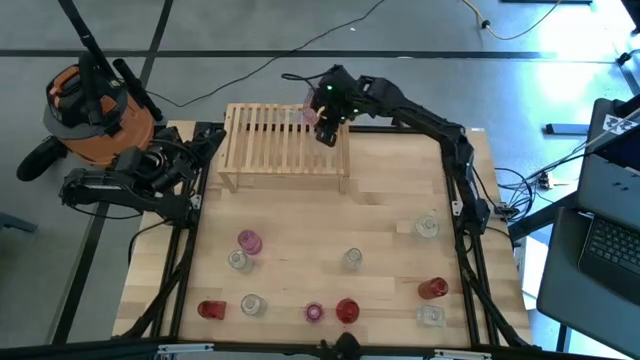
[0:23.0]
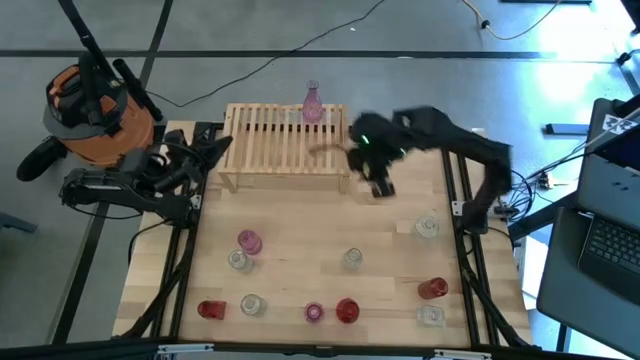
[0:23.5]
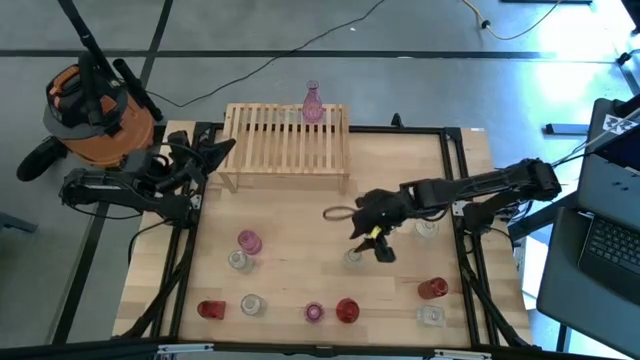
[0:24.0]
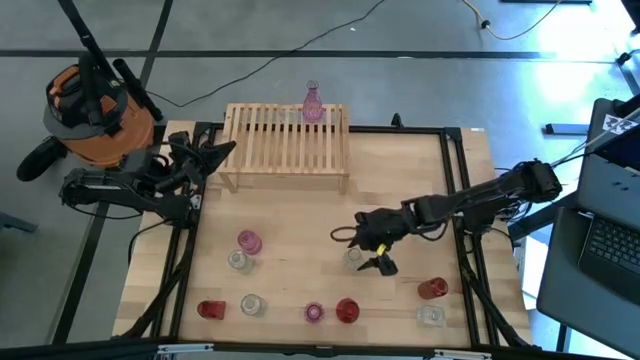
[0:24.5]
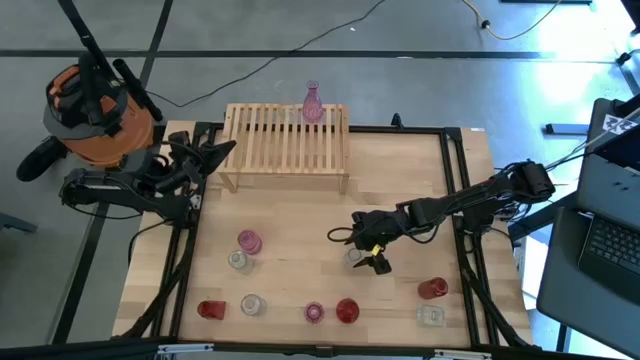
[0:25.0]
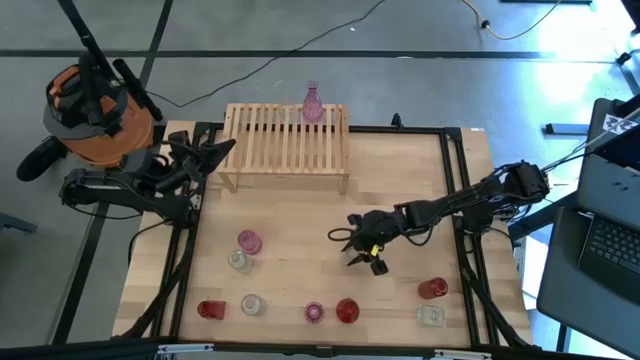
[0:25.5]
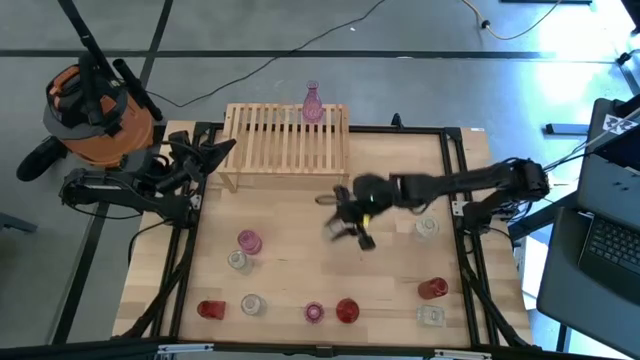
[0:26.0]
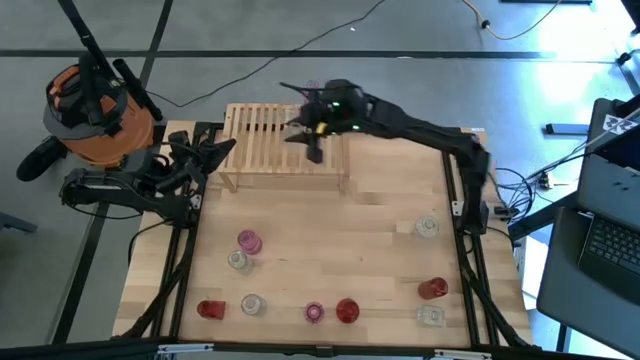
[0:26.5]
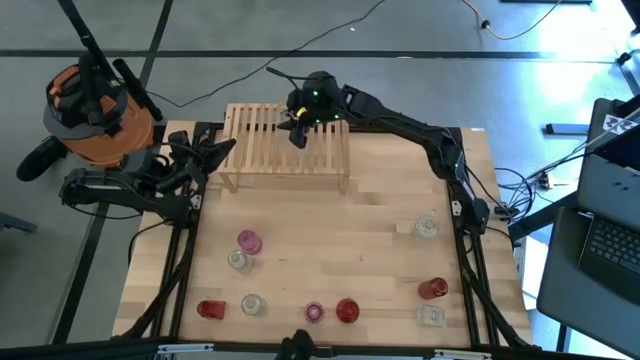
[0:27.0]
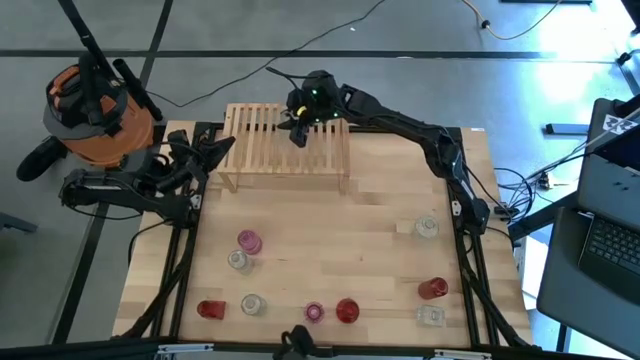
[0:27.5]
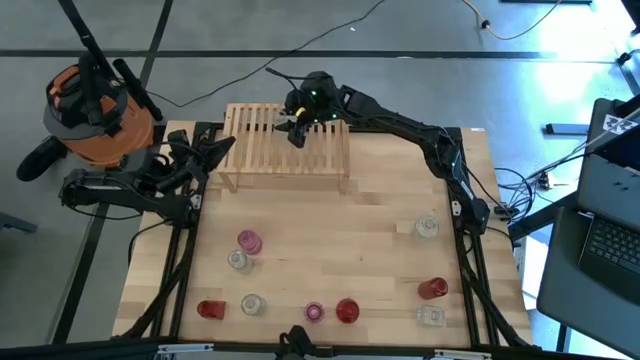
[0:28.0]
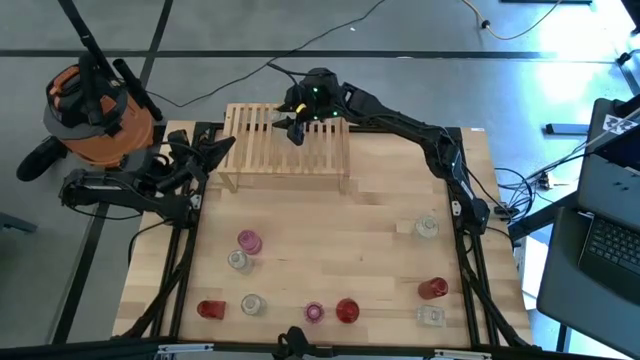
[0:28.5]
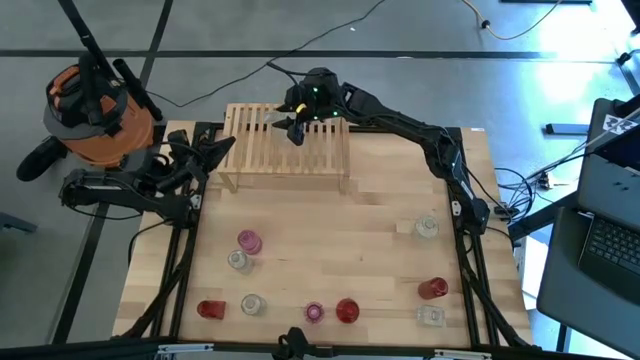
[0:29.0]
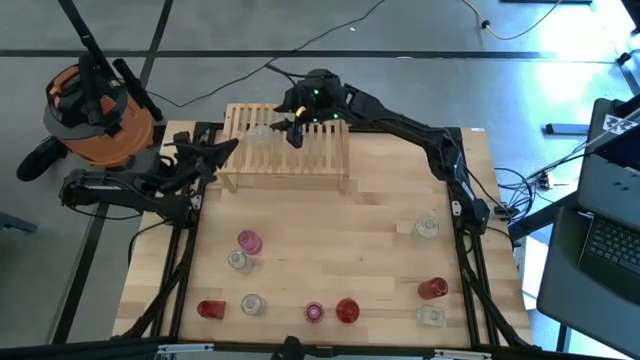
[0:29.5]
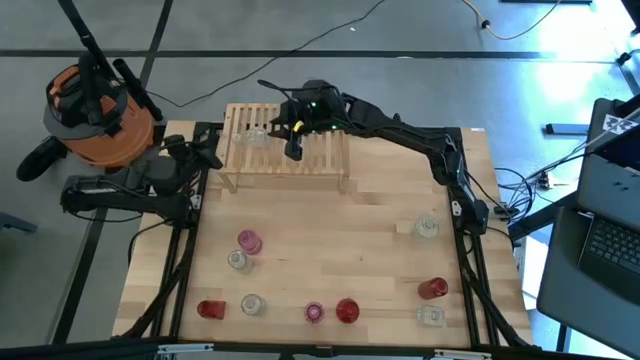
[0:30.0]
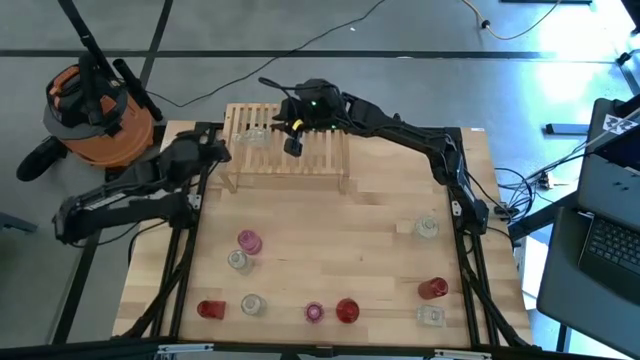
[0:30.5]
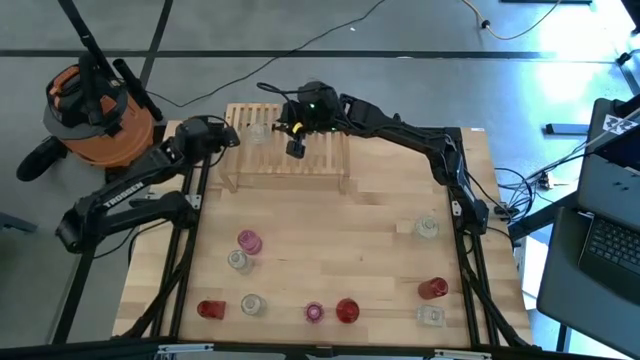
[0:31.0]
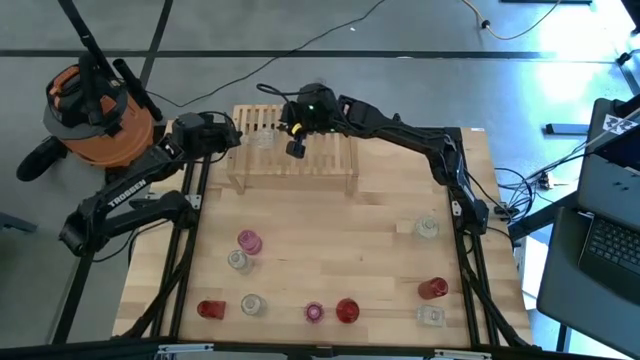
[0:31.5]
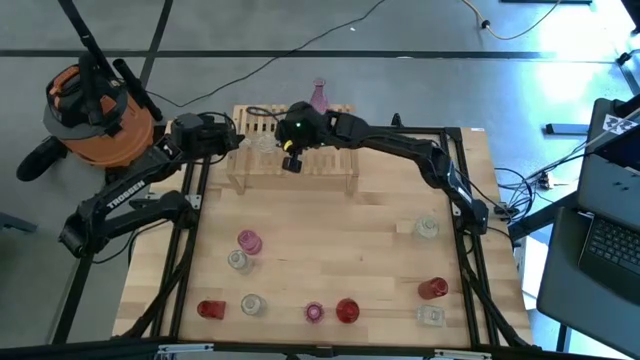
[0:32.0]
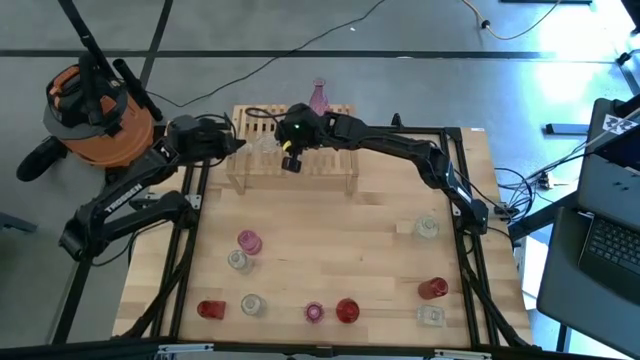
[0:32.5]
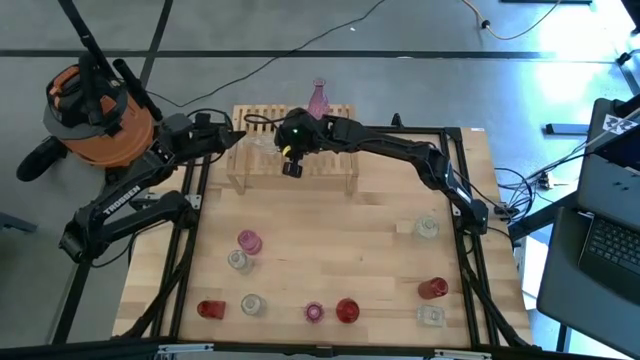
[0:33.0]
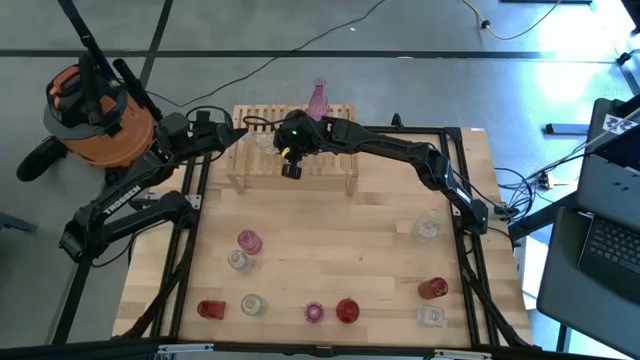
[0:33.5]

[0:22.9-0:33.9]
Task: sort vases onto shelf
Put the transparent vase on the shelf aligned with the other transparent vase on the right

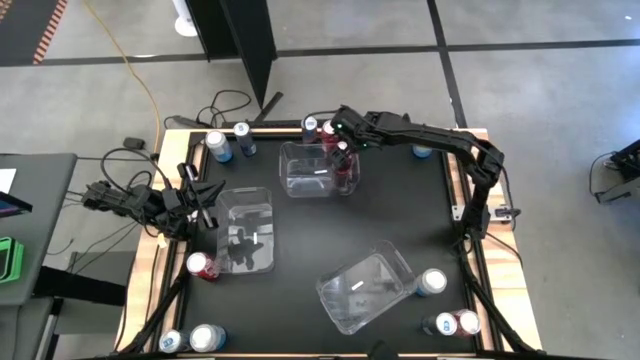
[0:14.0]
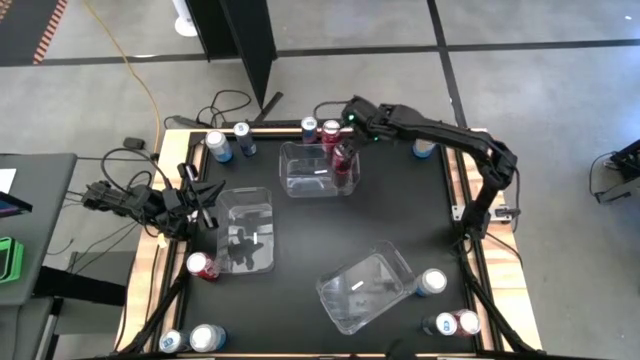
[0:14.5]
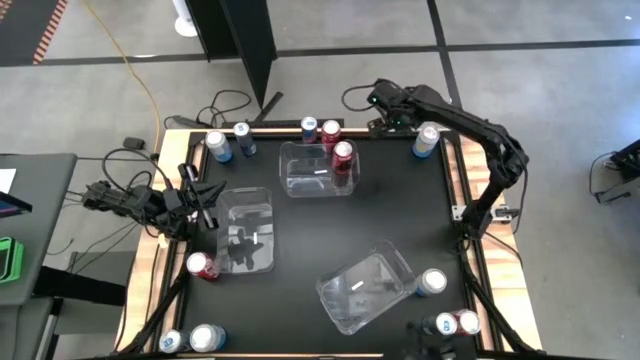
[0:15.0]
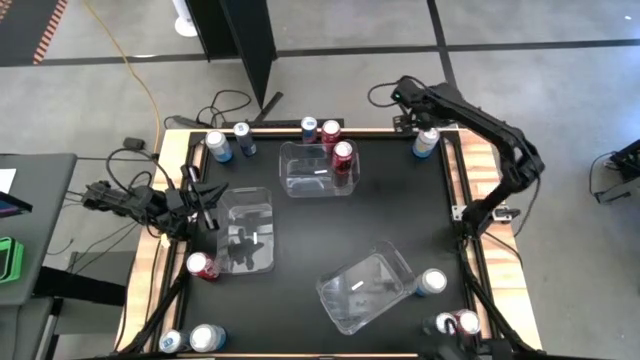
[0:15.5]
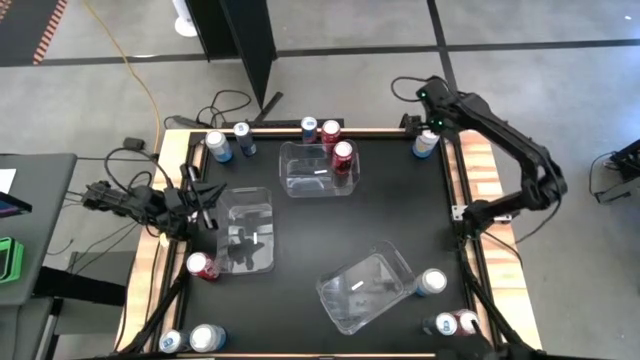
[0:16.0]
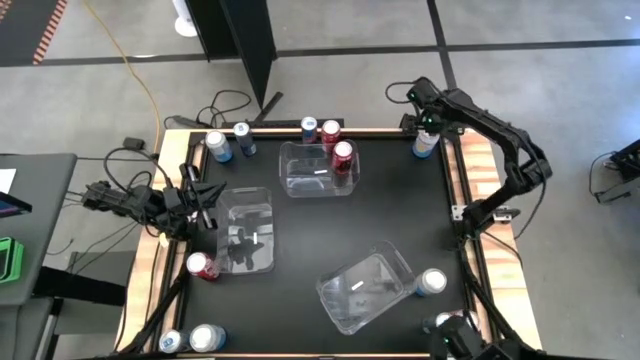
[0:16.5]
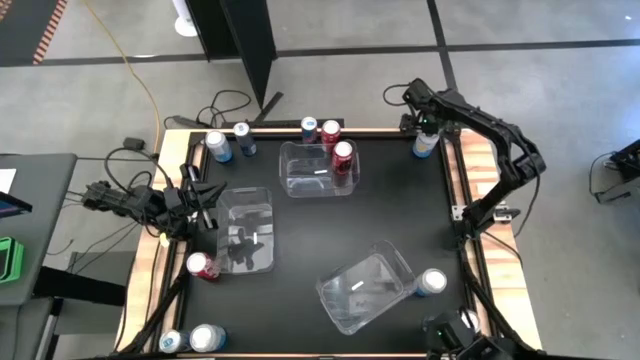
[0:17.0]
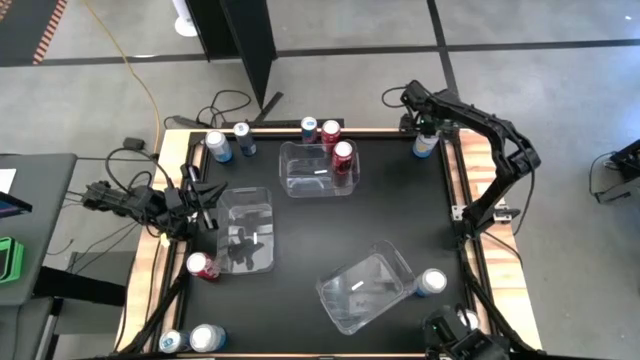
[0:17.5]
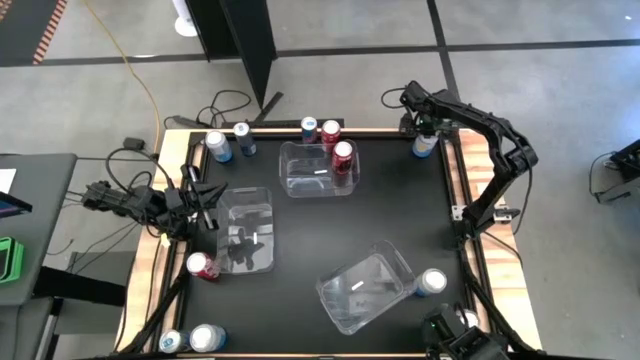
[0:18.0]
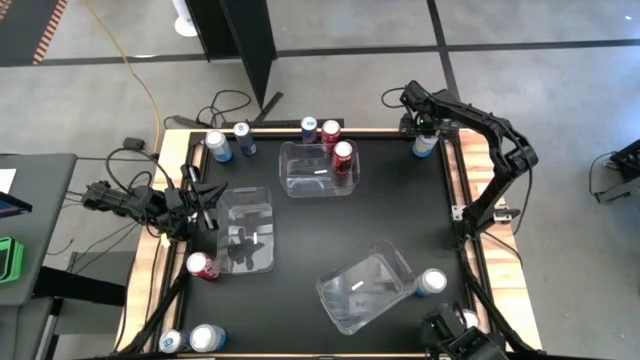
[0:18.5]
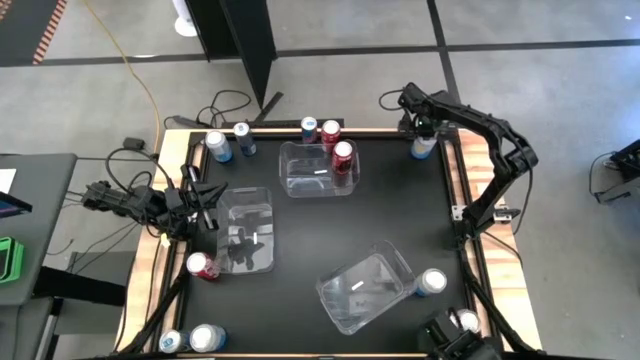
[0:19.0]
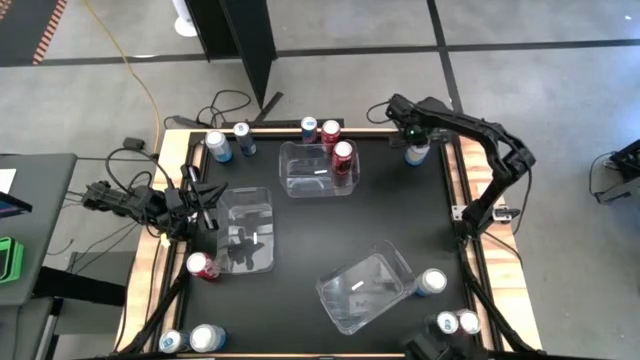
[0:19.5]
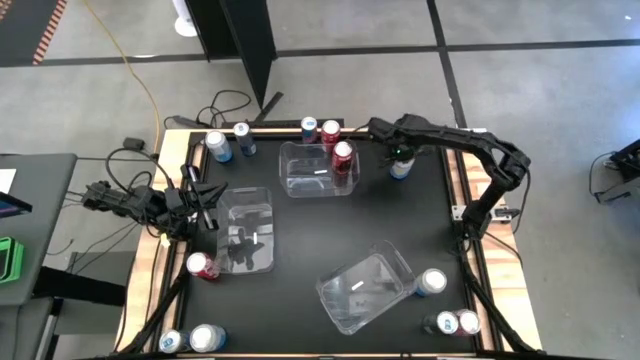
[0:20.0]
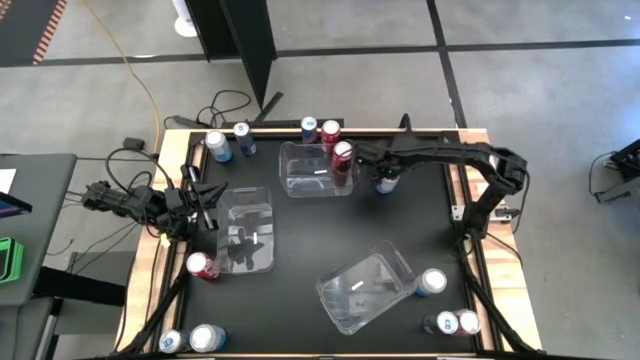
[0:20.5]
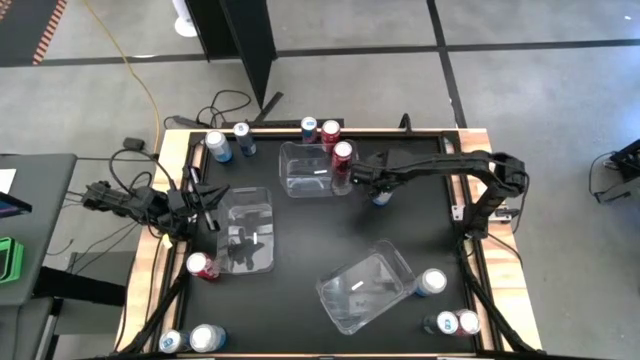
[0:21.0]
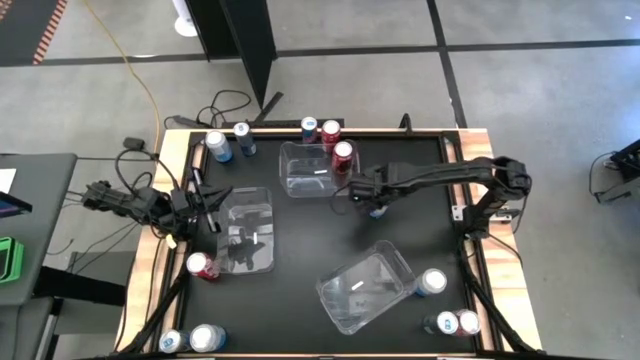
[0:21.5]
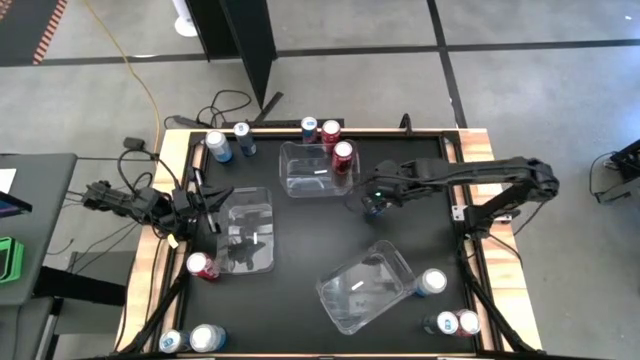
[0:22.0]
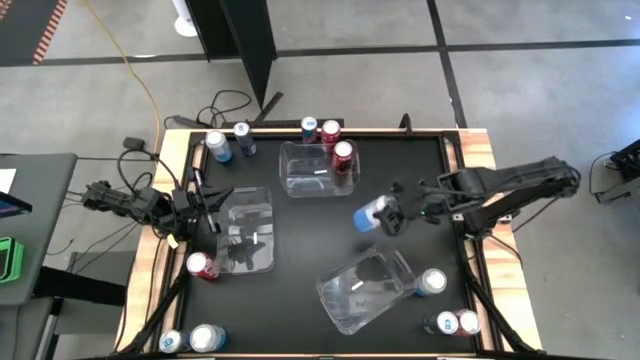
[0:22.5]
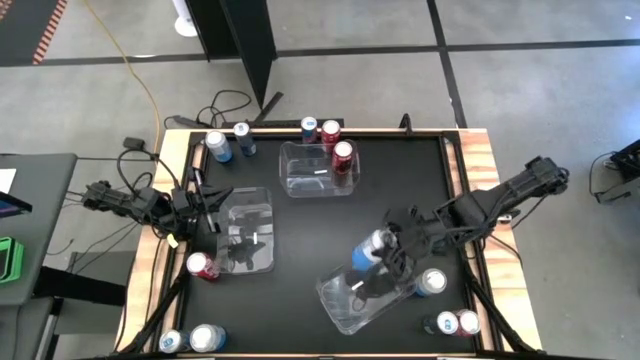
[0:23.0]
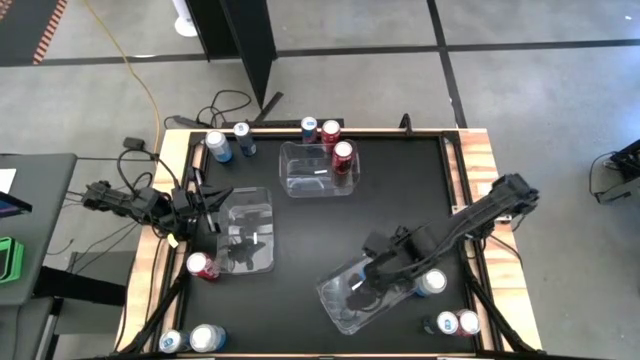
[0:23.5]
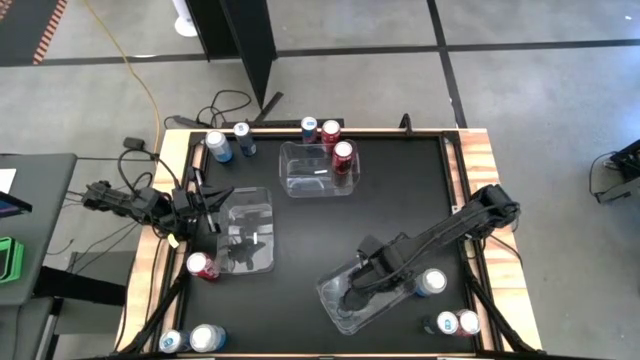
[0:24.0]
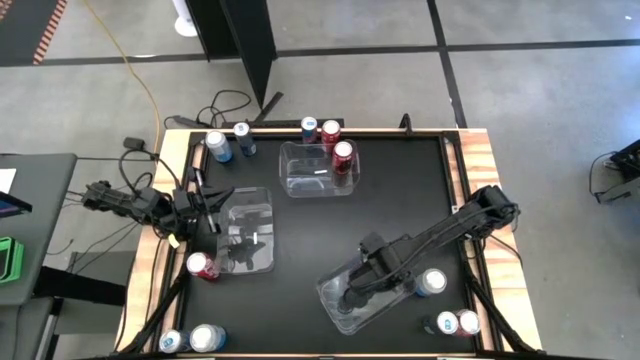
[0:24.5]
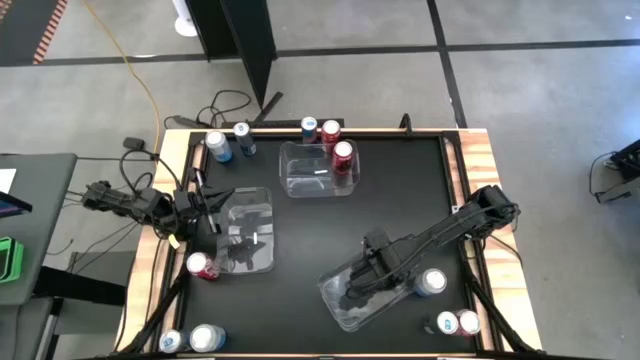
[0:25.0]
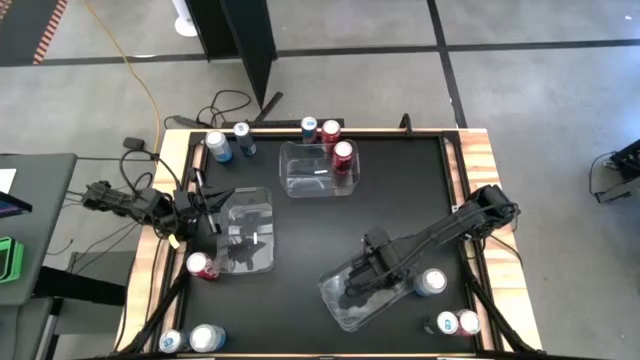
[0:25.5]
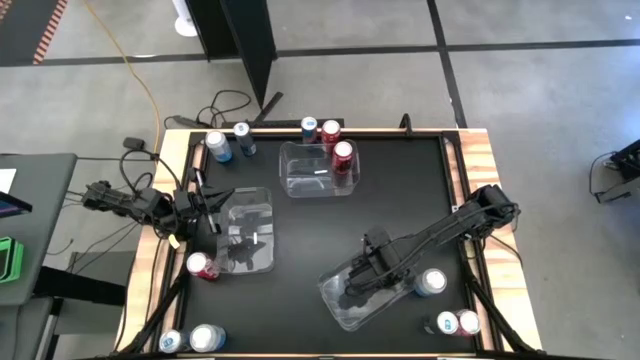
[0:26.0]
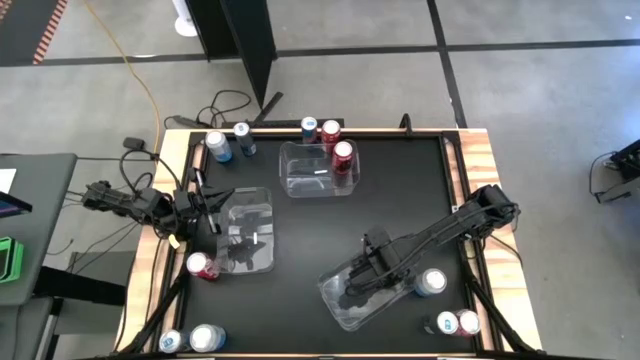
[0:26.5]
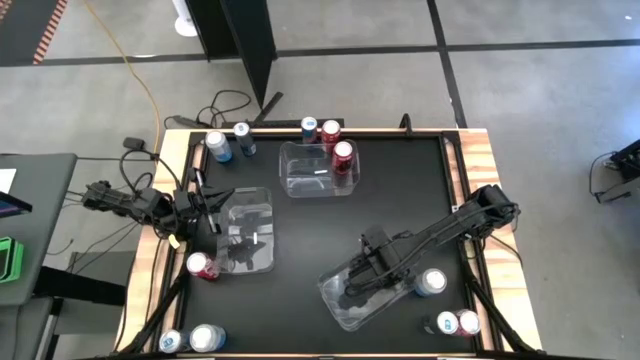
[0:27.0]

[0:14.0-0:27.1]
Task: Sort soda cans
Put the blue-white soda can into the bottom transparent bin
